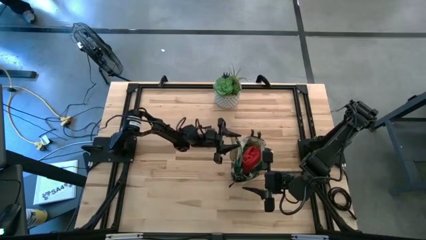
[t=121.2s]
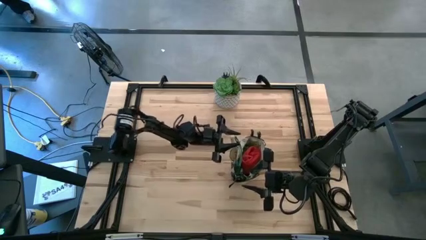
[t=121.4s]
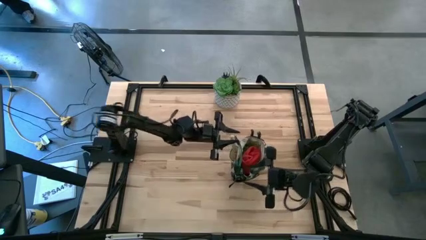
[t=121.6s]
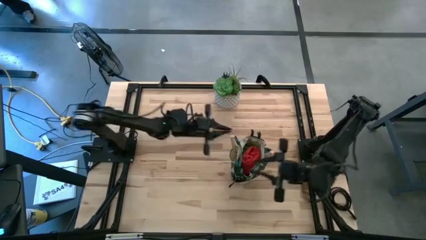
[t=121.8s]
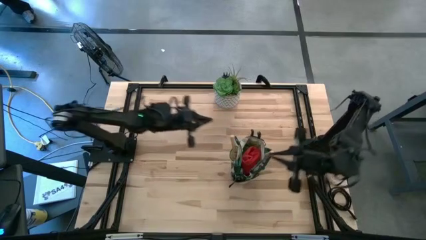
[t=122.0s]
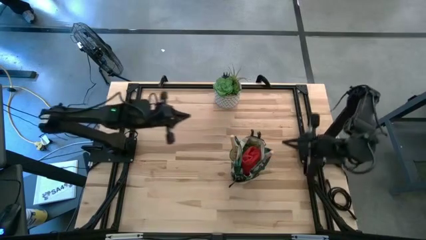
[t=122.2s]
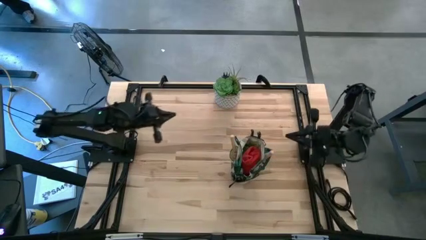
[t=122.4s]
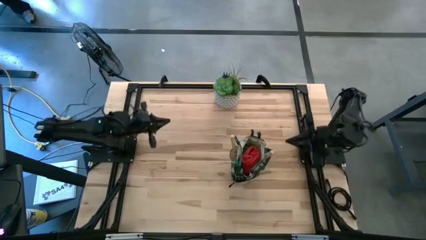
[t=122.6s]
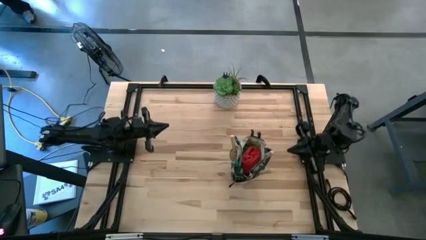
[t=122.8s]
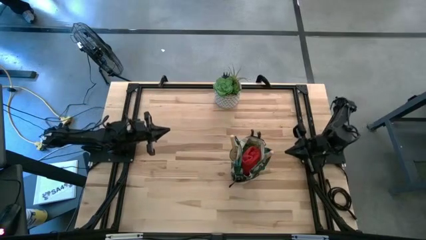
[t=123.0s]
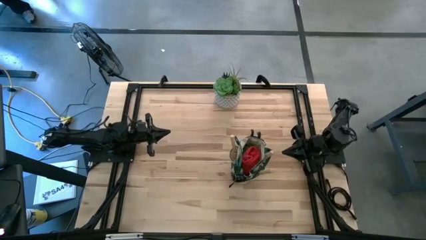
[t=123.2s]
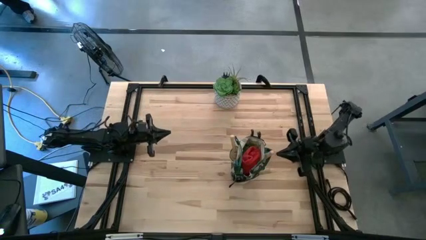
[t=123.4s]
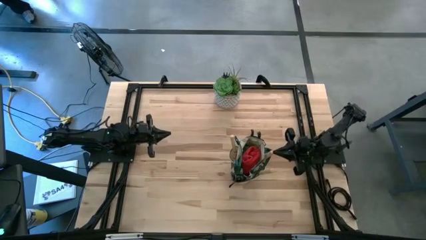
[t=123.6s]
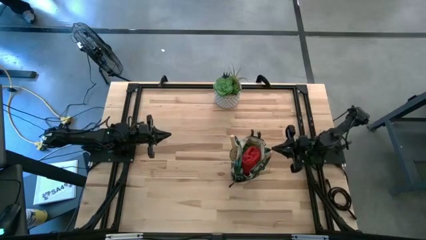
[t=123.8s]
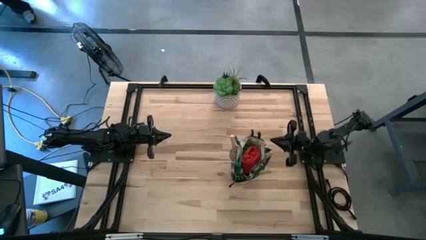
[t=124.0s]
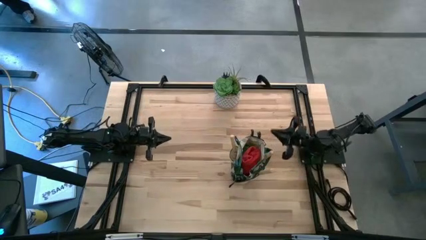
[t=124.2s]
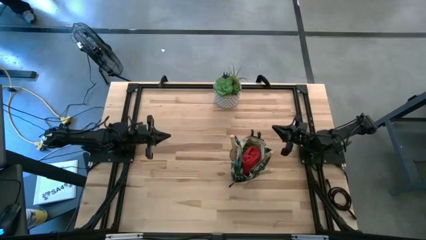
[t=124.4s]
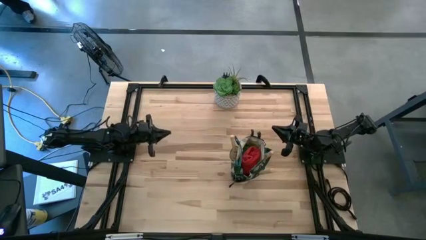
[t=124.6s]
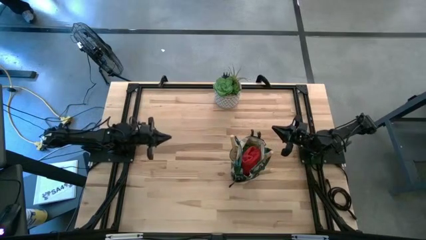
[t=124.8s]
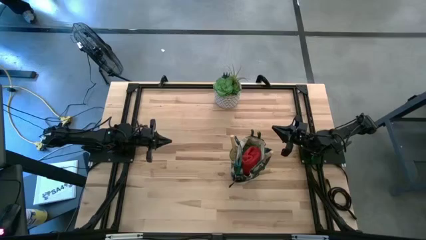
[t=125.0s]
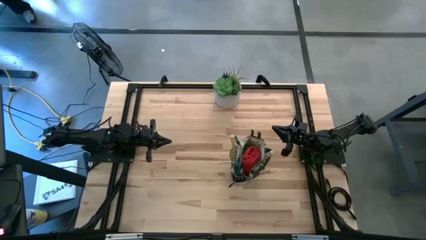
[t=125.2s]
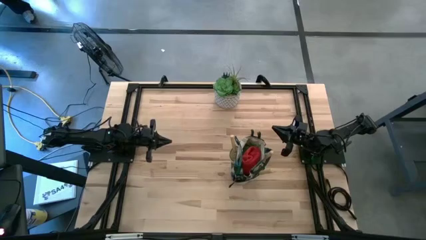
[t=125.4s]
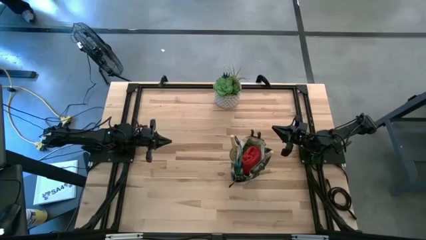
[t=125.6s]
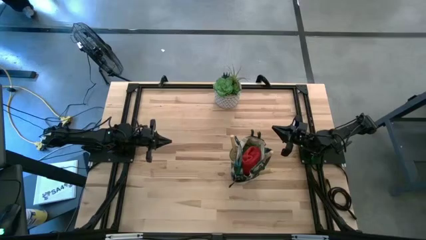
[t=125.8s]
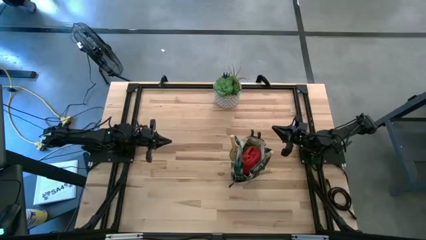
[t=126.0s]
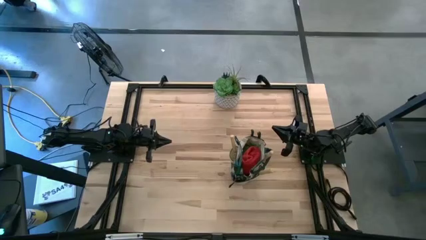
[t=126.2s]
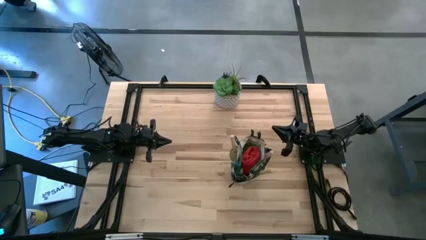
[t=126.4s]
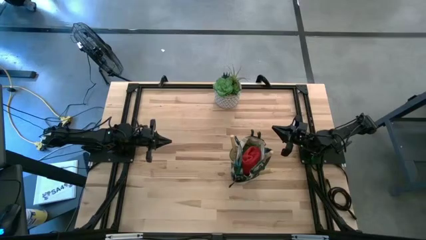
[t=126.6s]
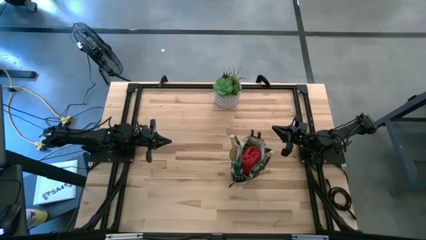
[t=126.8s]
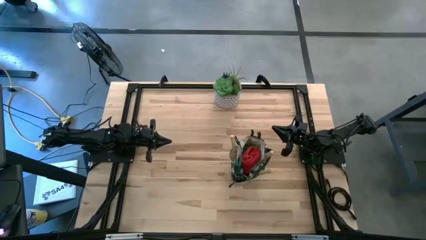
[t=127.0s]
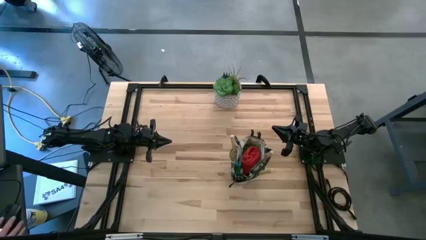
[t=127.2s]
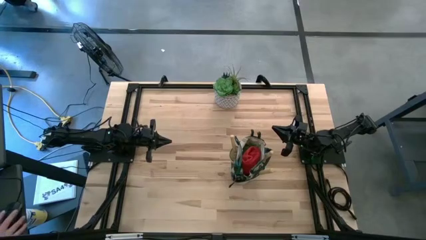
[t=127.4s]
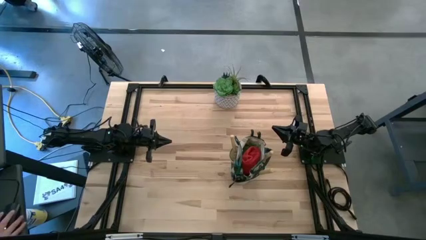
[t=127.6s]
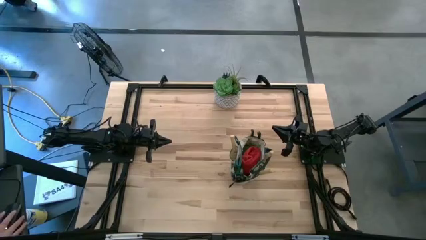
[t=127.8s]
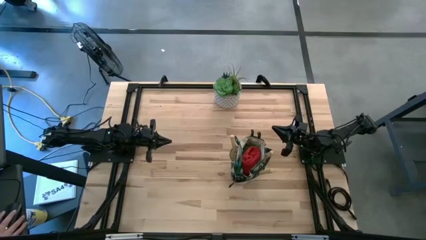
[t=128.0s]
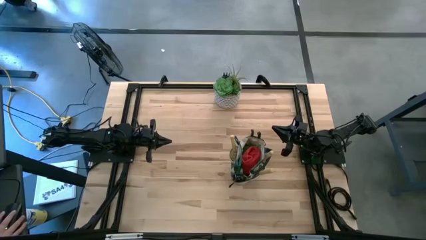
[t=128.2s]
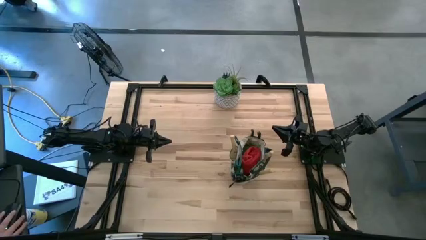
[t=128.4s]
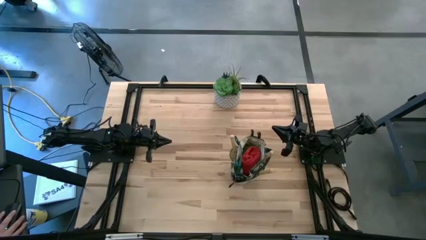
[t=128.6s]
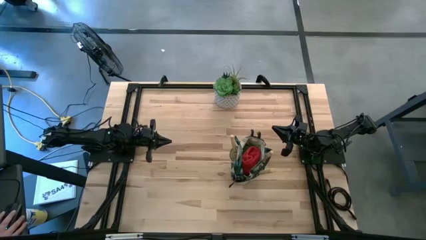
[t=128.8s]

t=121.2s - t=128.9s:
Task: Pick & Place Garden tools in Gardening bag
Return to Home Position

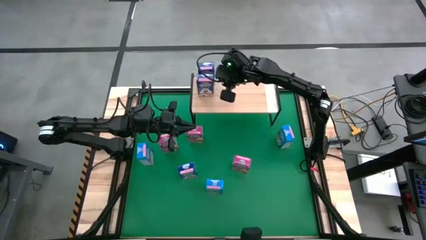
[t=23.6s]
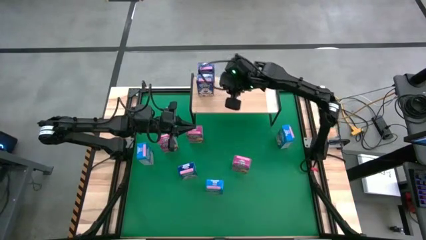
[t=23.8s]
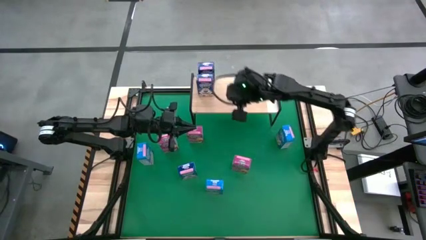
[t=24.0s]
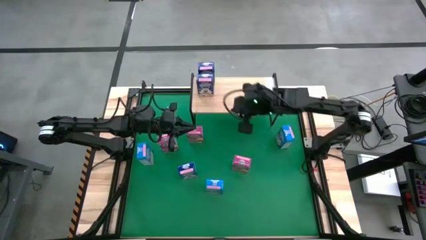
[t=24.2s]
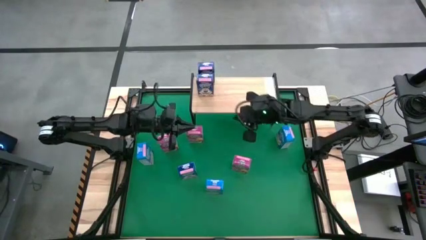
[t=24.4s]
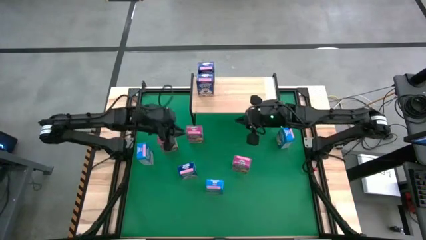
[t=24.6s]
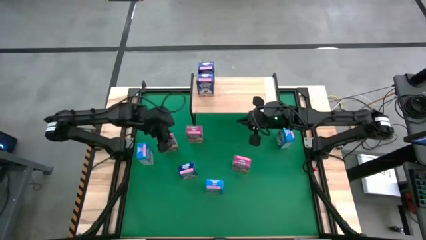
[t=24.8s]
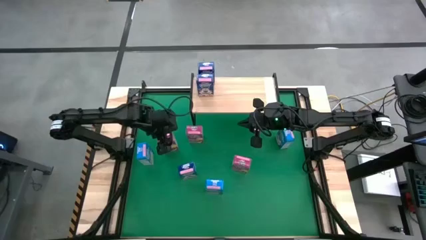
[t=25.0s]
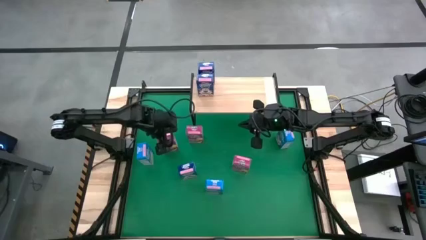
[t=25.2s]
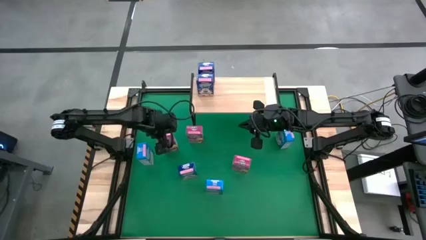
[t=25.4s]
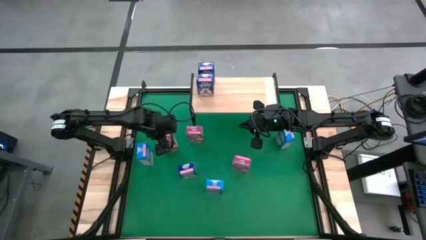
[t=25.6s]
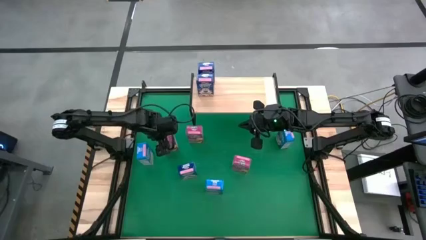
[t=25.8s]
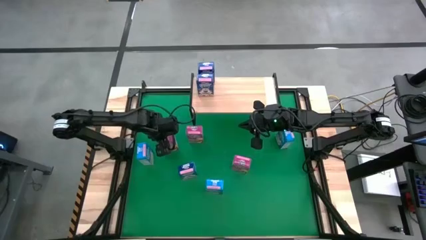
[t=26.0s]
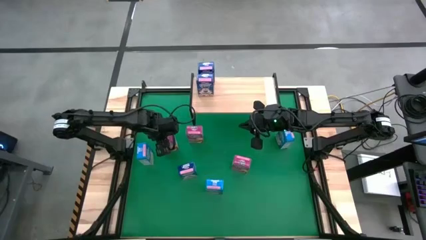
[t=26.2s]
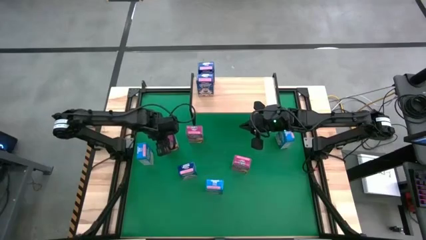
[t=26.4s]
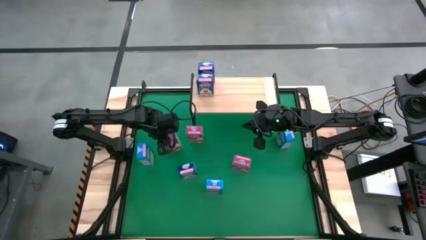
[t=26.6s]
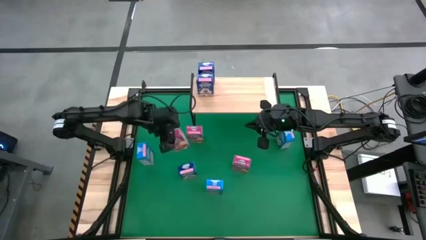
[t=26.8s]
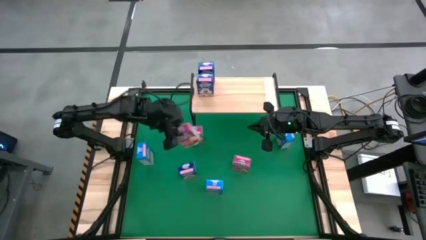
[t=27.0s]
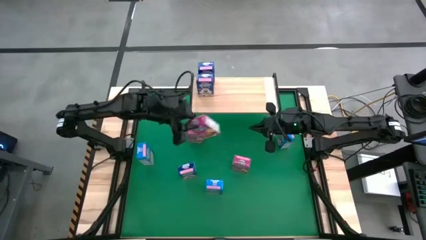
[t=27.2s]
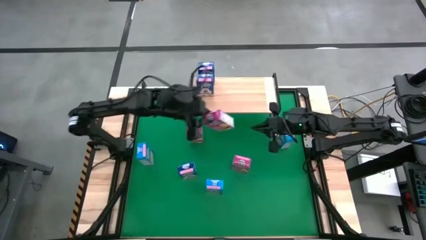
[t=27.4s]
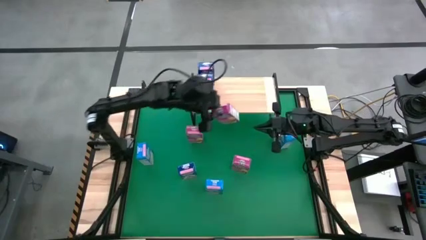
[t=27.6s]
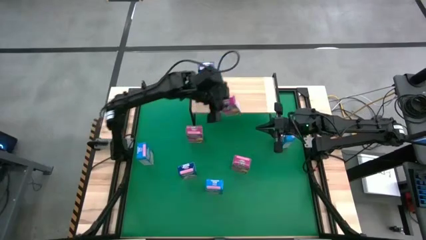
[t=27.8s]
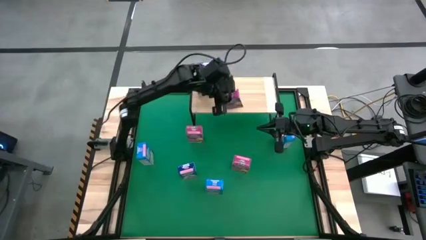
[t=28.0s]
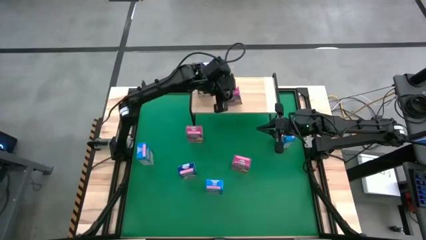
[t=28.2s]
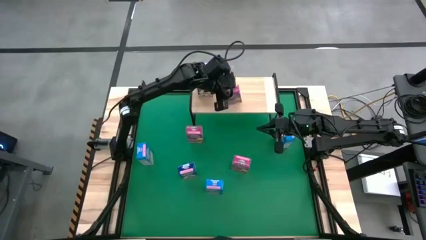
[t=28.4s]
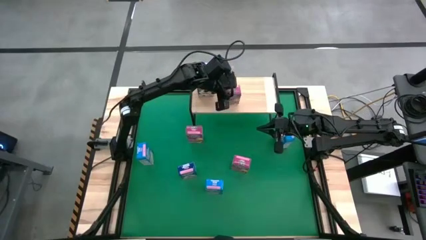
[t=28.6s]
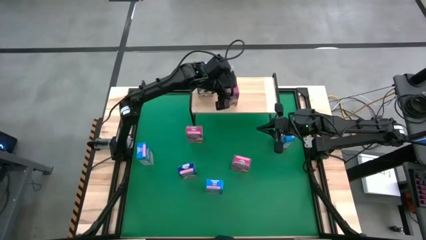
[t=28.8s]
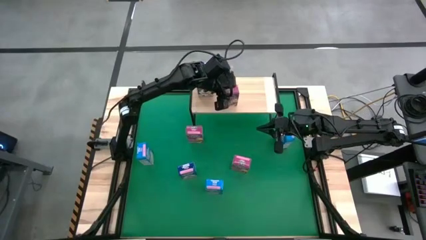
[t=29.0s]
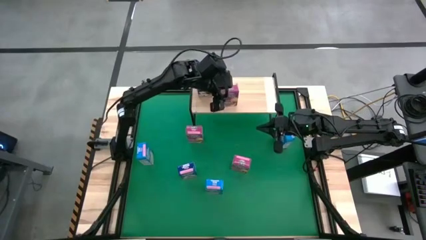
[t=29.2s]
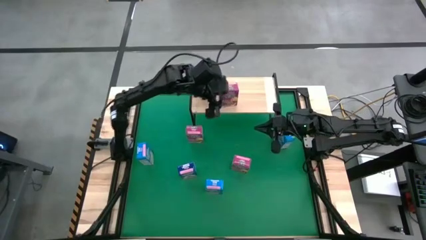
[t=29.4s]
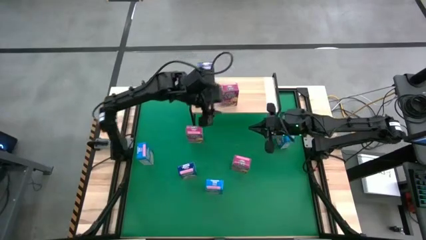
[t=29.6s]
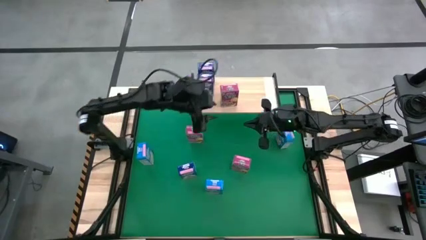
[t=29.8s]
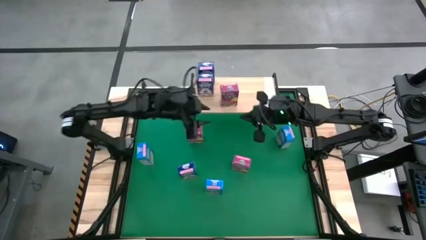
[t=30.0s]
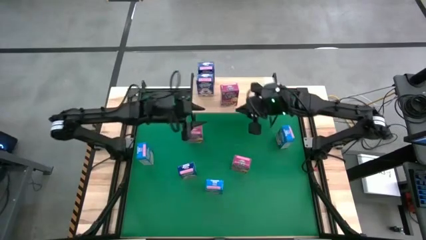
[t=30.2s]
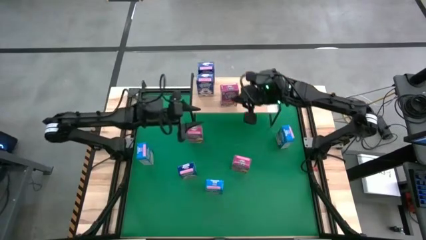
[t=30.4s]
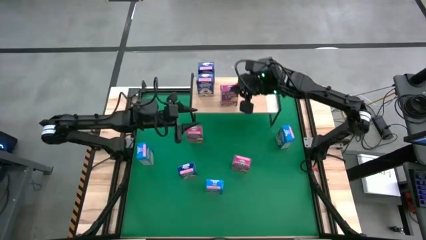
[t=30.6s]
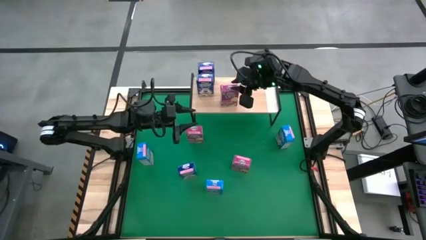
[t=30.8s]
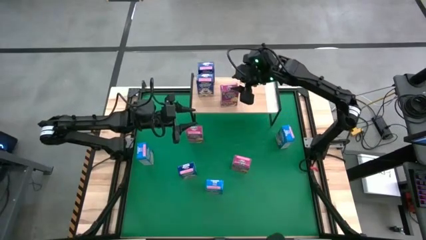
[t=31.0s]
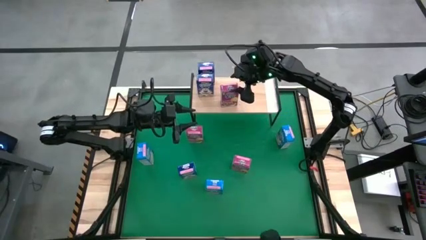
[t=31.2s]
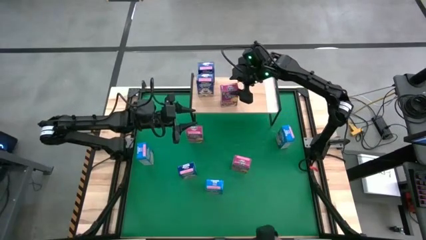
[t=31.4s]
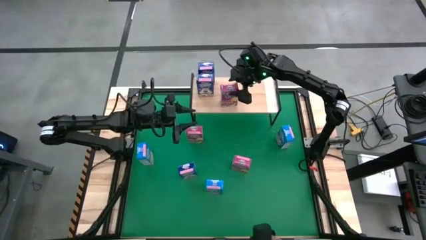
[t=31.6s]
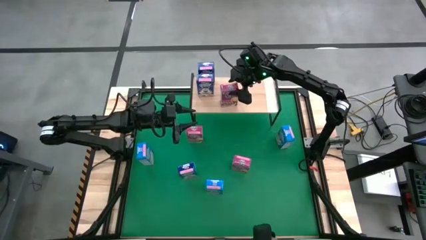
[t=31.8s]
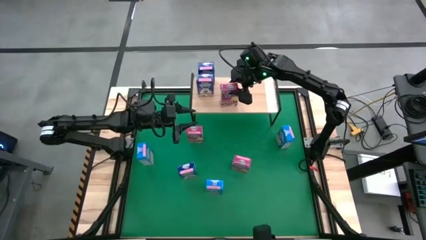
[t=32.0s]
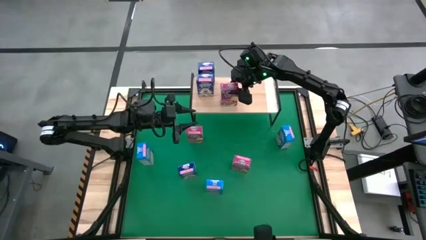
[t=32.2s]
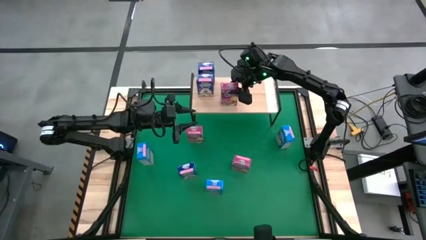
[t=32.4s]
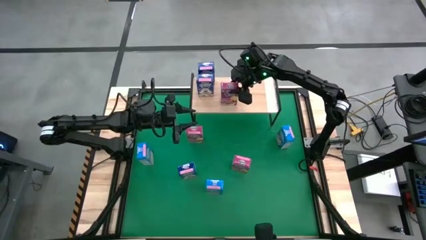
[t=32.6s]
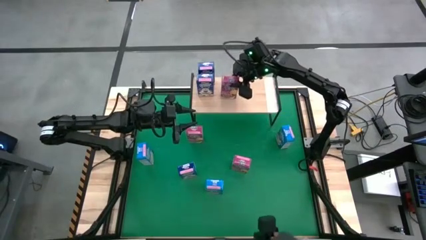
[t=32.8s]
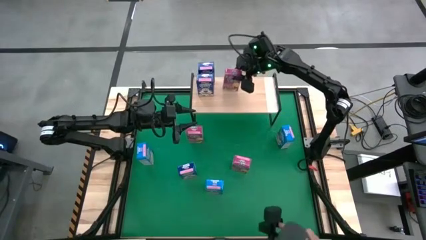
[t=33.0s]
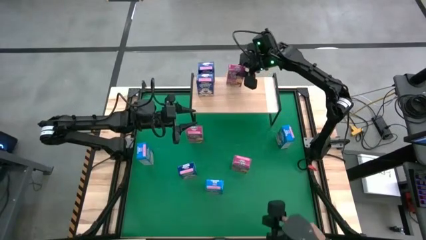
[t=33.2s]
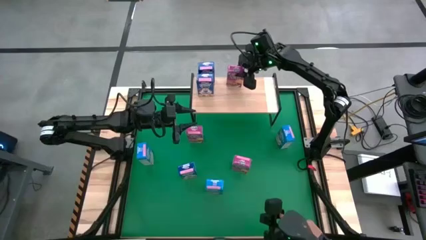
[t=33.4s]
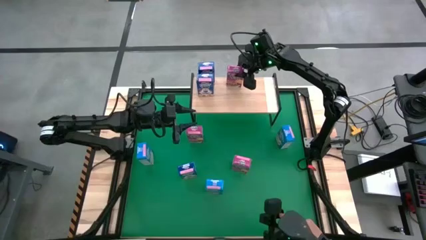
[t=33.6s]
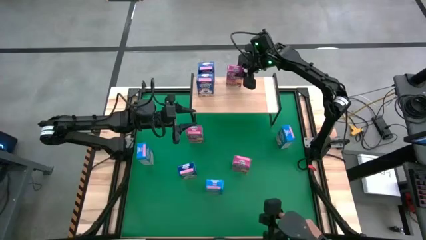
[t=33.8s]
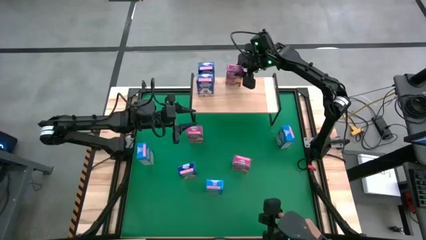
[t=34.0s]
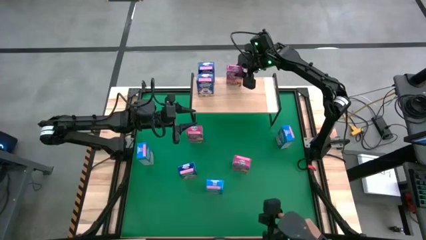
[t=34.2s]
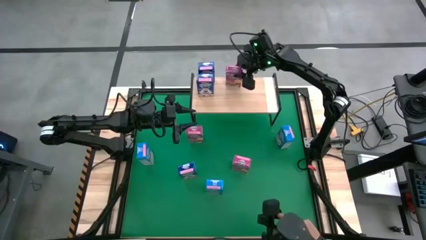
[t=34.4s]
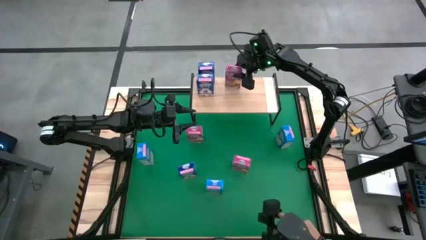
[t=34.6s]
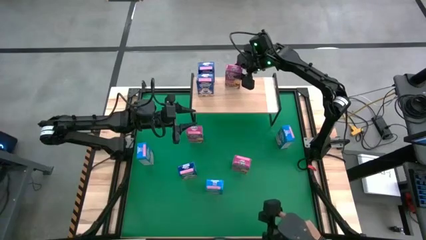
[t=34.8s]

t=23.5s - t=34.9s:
Task: Stack cereal on shelf
Put the left pink cereal box on the shelf
